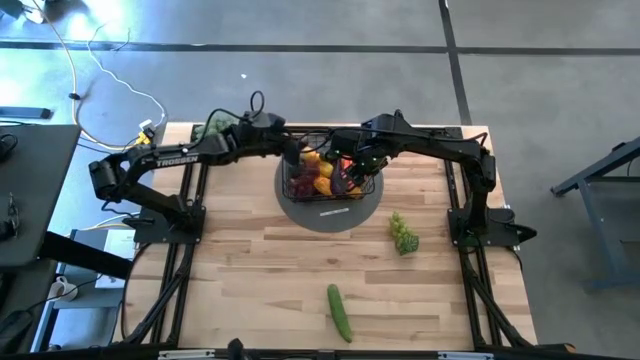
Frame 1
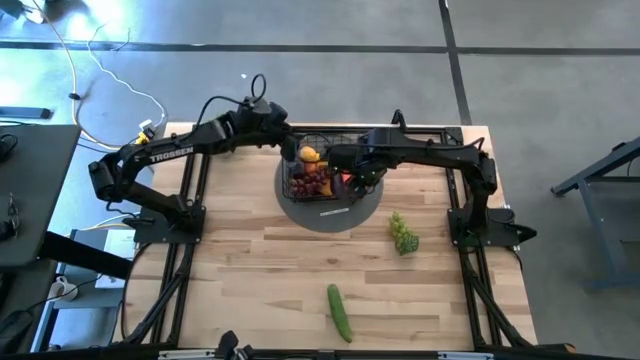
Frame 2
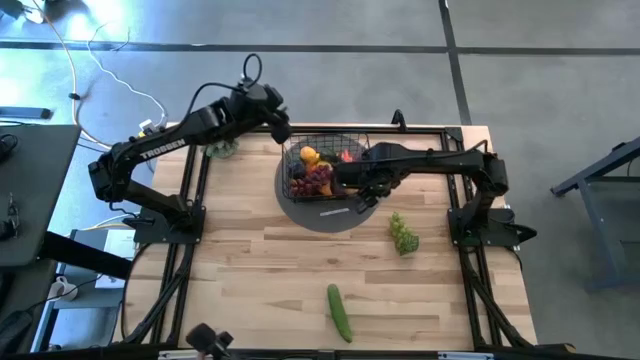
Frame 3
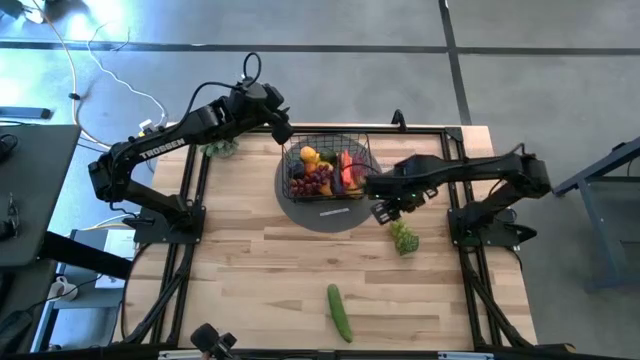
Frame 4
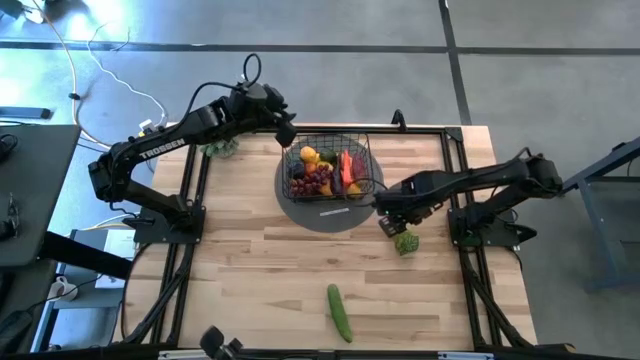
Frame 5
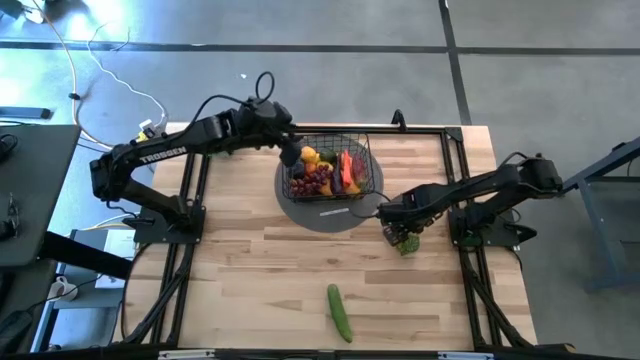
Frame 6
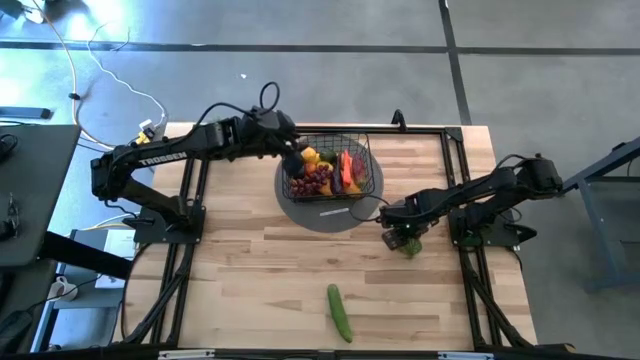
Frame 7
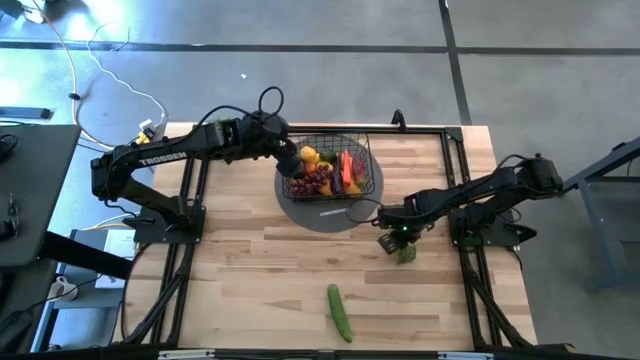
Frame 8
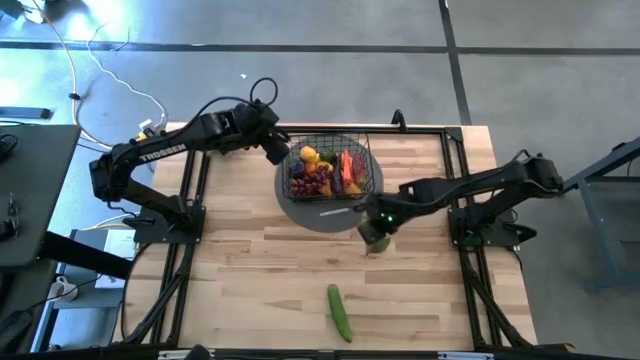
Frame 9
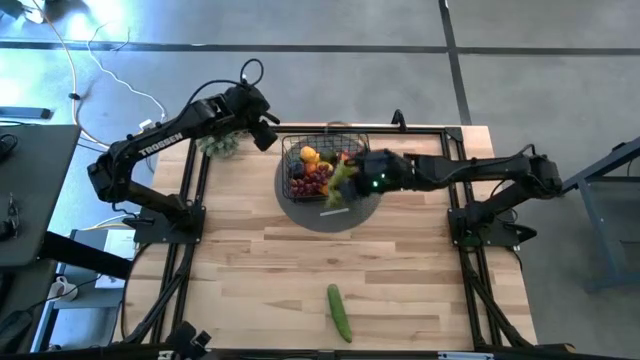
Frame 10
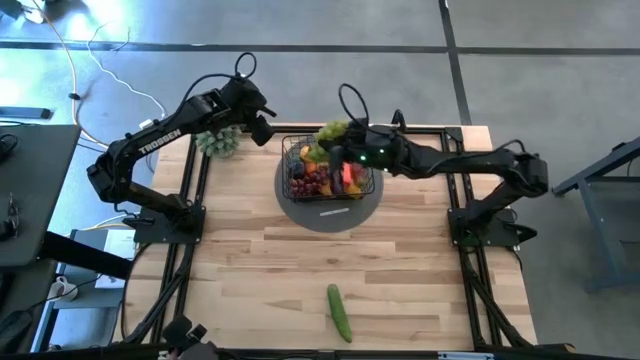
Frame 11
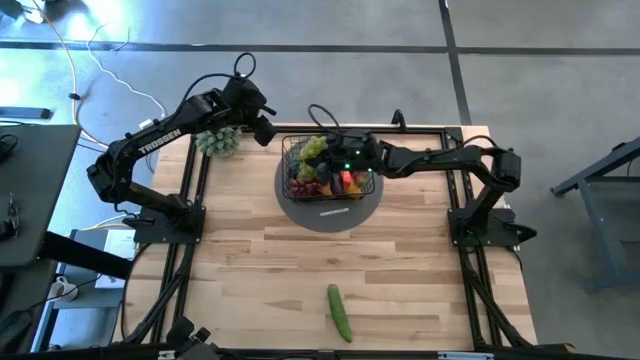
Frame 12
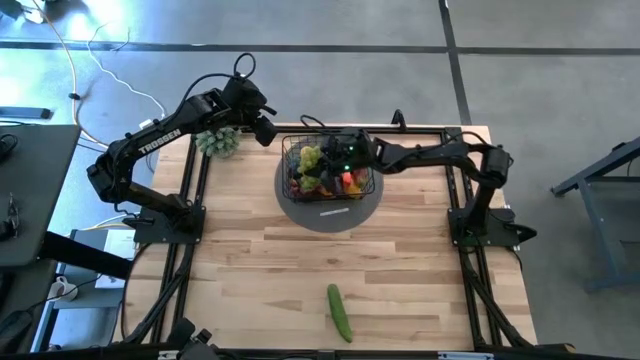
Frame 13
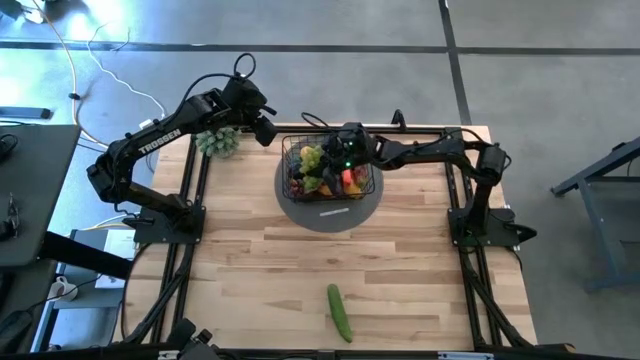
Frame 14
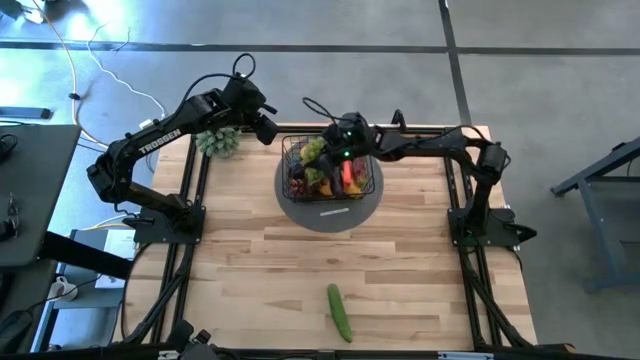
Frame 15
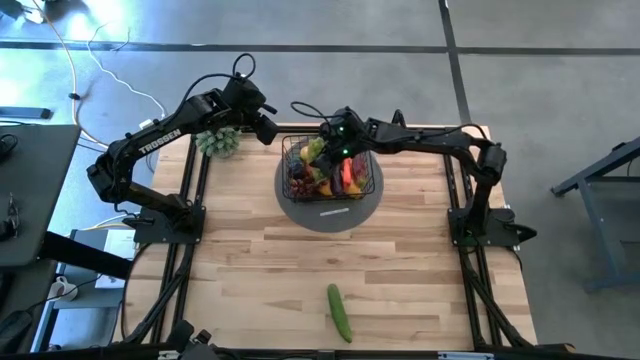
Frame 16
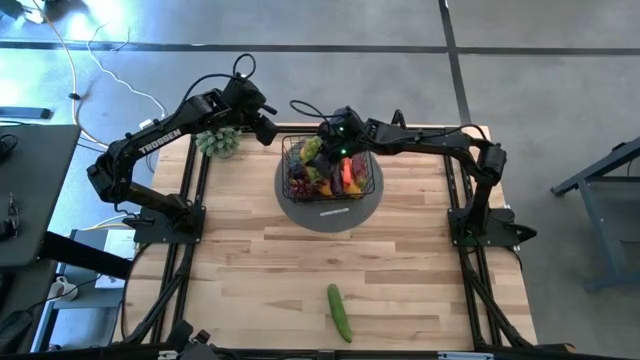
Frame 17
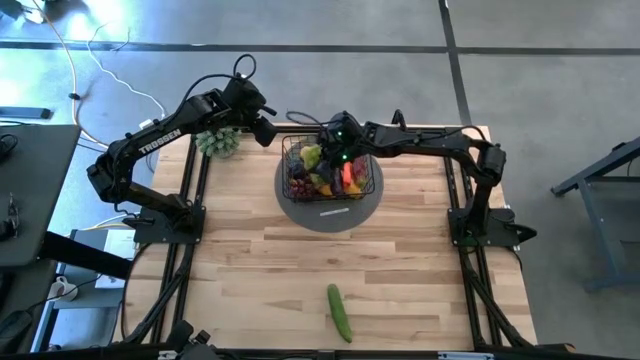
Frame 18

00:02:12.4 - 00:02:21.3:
Task: Build produce basket
Put the green grapes into the black wire basket

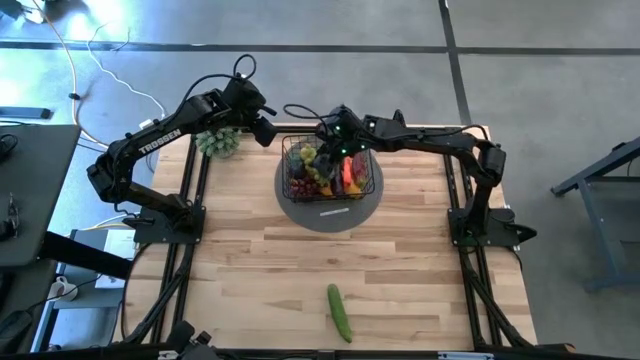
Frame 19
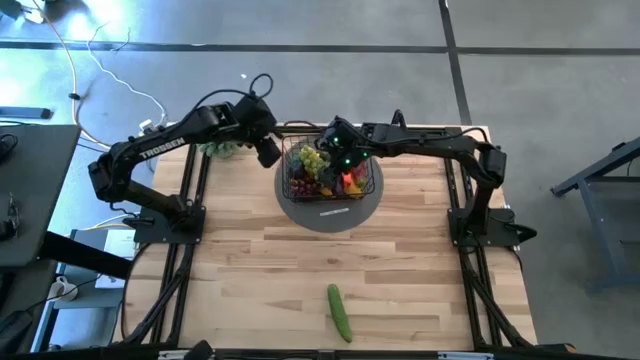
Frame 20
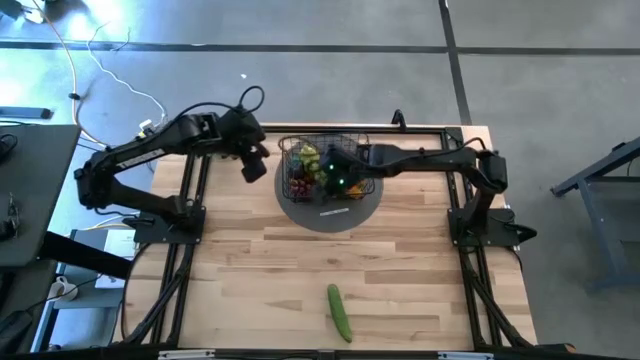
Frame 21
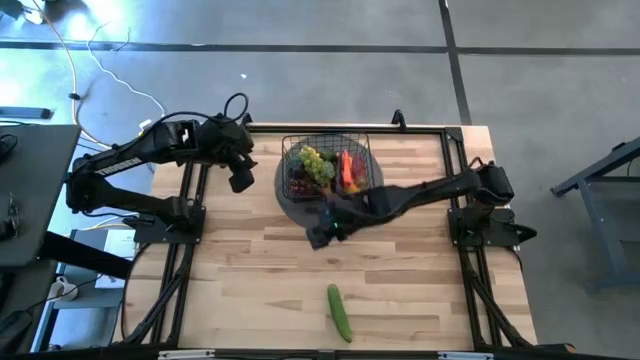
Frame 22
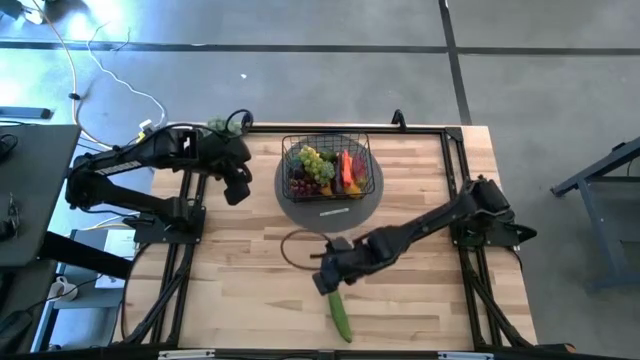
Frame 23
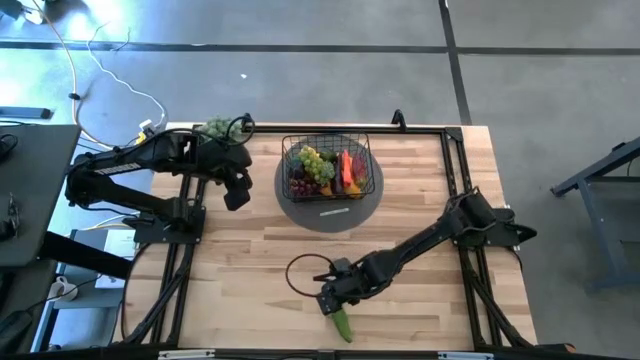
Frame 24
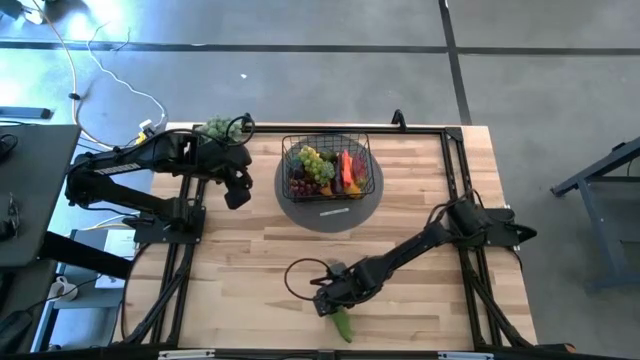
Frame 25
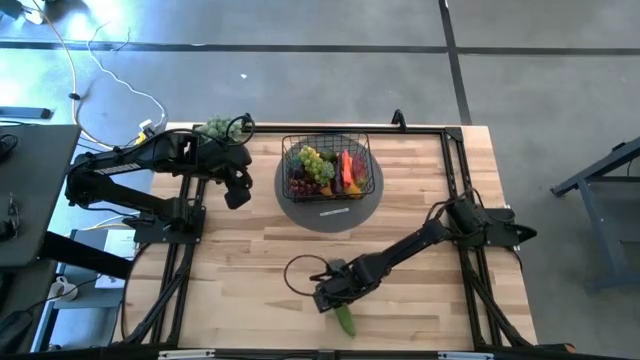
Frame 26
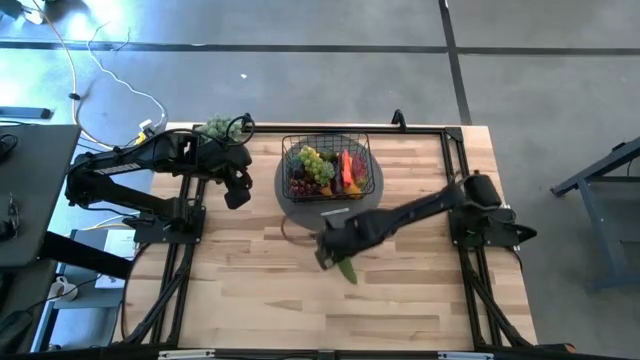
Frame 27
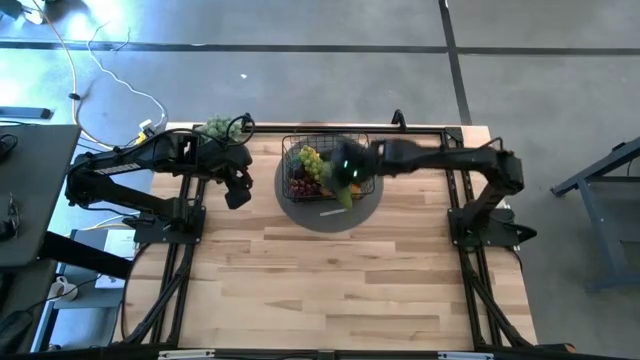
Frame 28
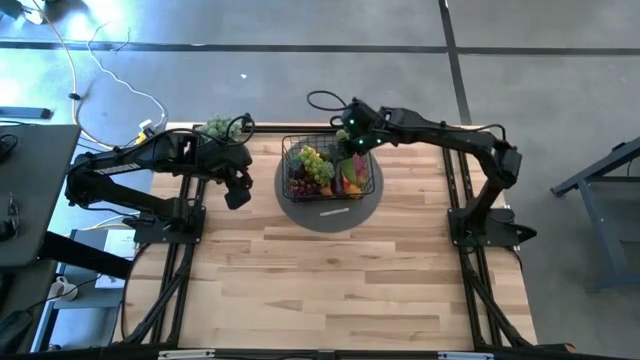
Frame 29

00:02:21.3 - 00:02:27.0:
Put the cucumber into the black wire basket

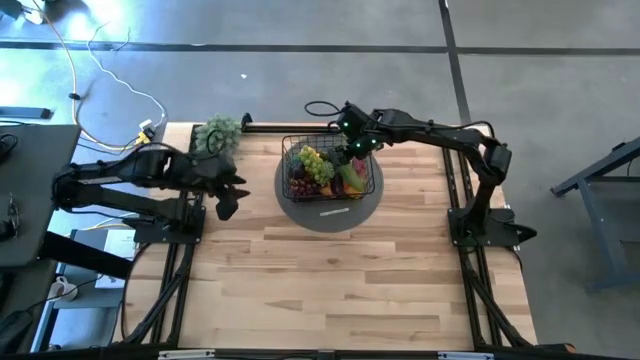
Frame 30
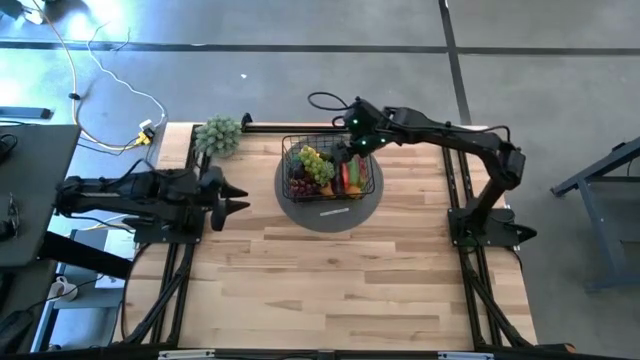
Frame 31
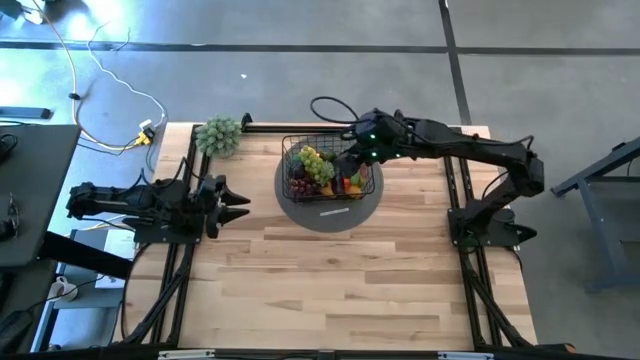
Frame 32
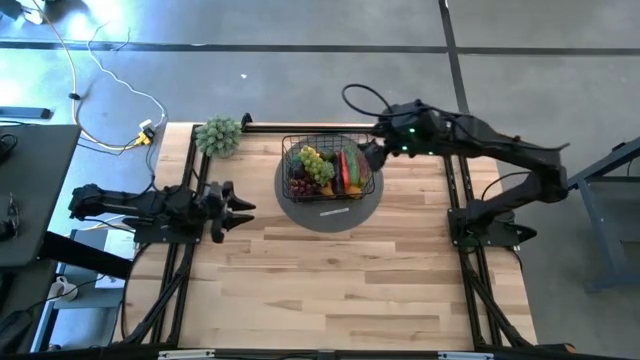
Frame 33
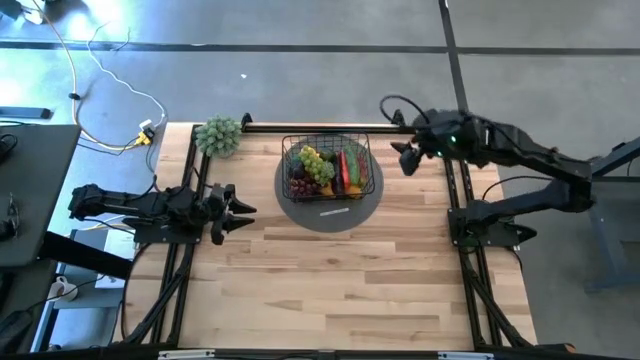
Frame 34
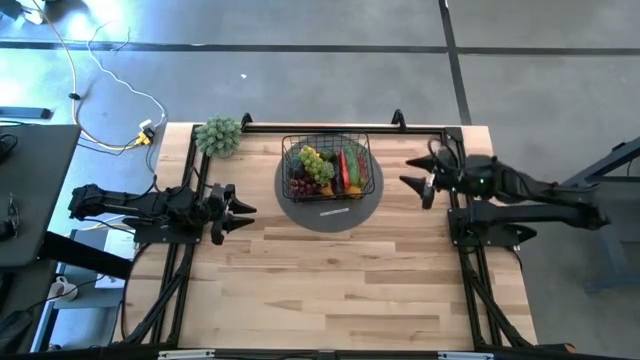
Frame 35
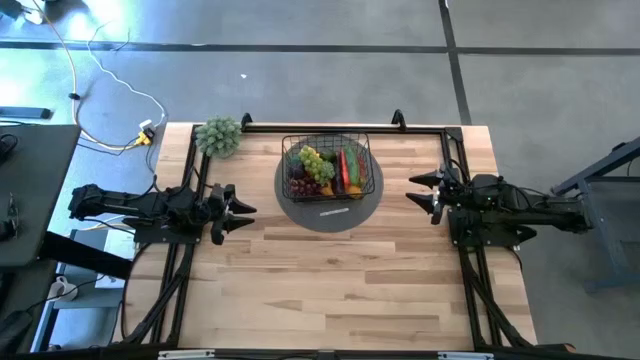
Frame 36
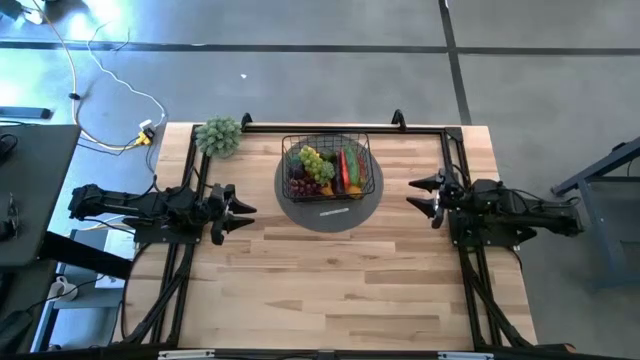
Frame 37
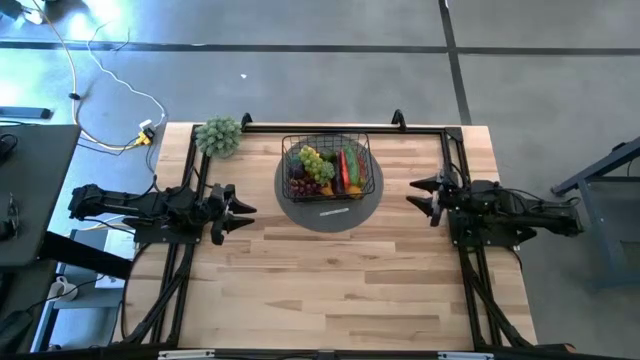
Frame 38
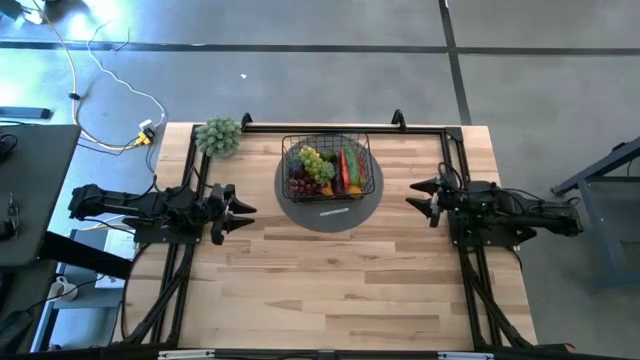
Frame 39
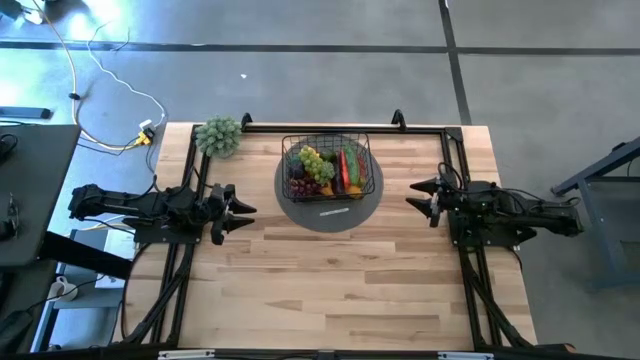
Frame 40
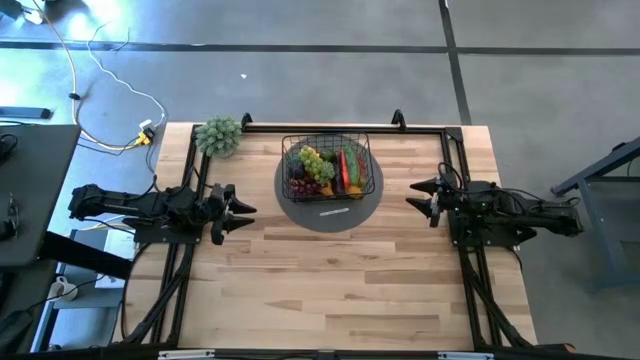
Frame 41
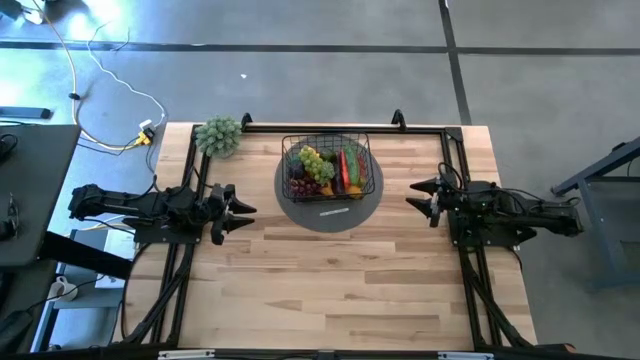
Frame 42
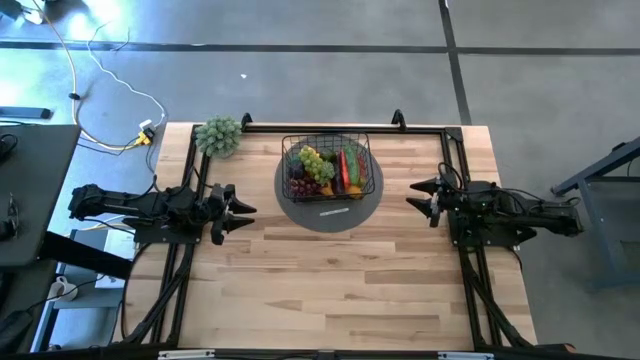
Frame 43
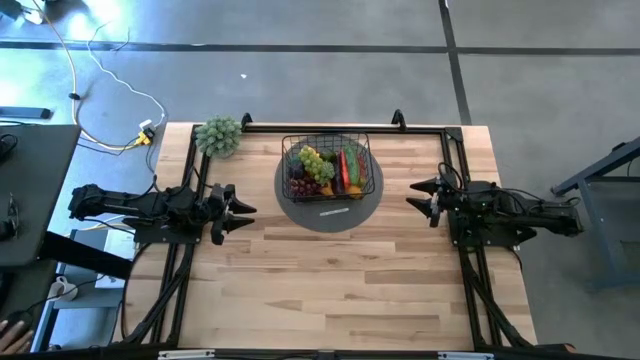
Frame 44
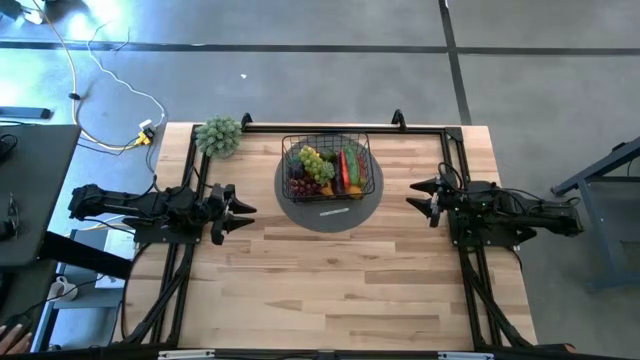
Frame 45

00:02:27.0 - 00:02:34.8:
Return to Home Position
